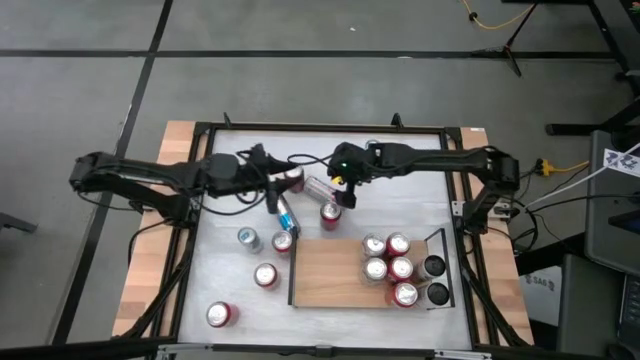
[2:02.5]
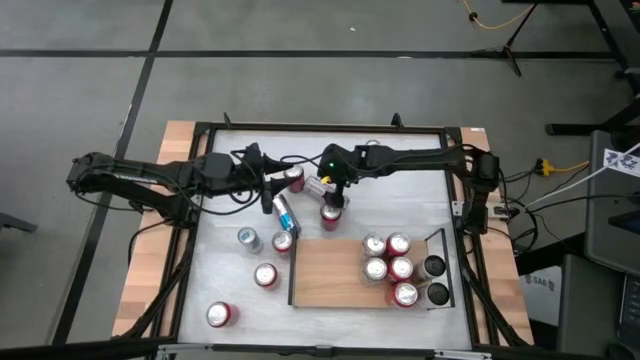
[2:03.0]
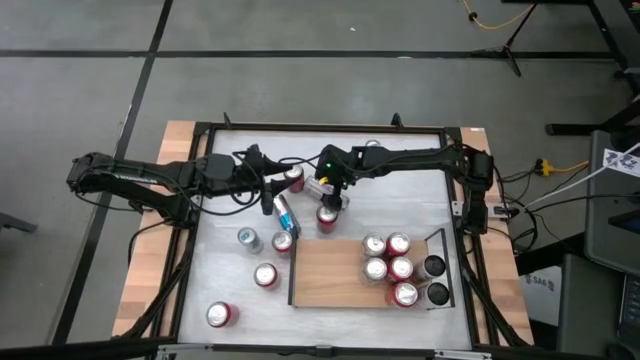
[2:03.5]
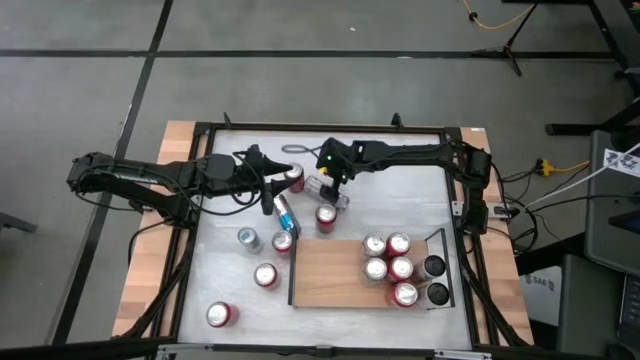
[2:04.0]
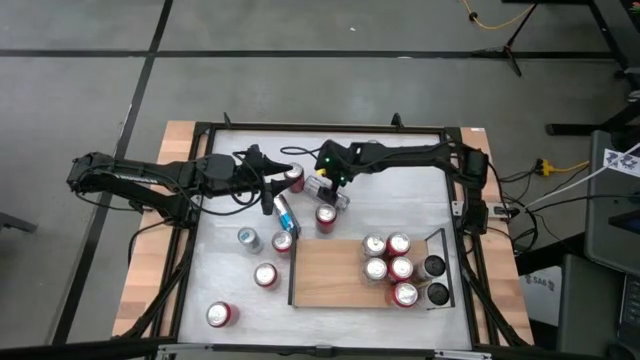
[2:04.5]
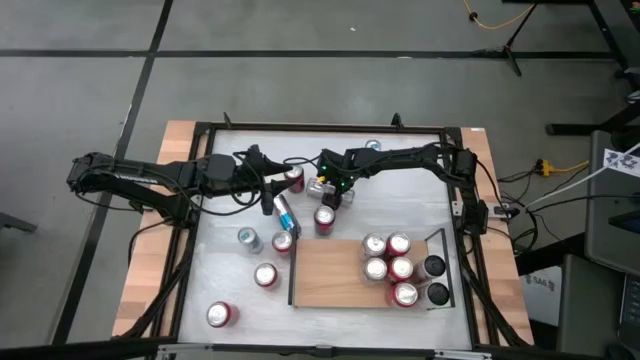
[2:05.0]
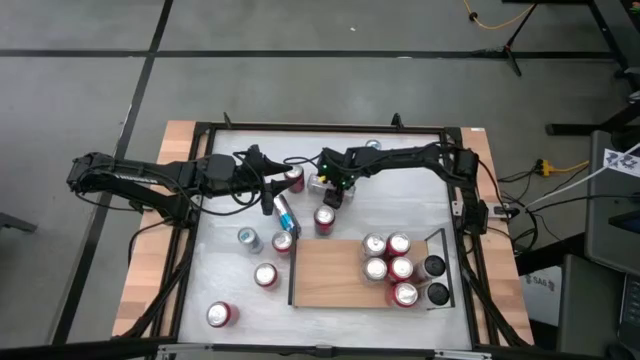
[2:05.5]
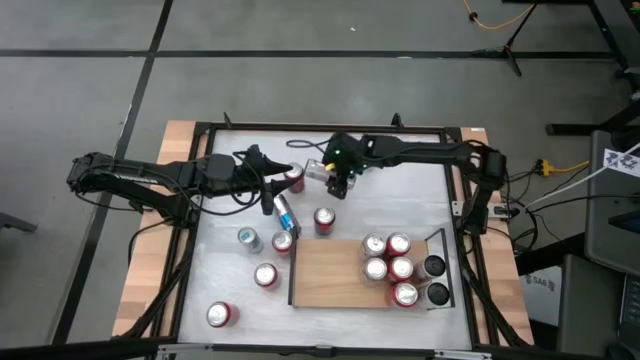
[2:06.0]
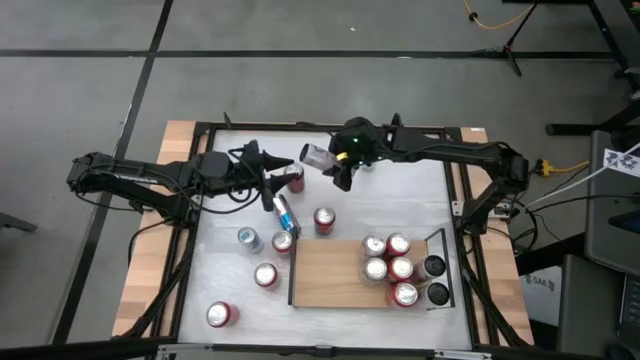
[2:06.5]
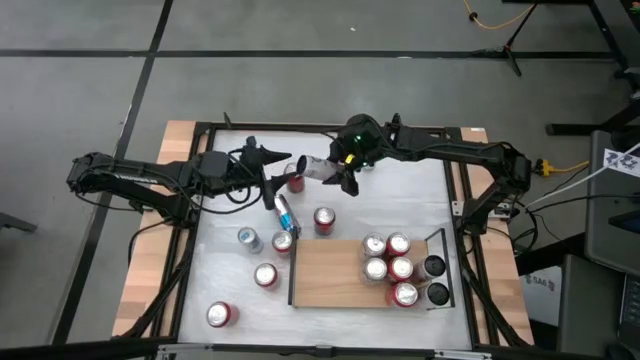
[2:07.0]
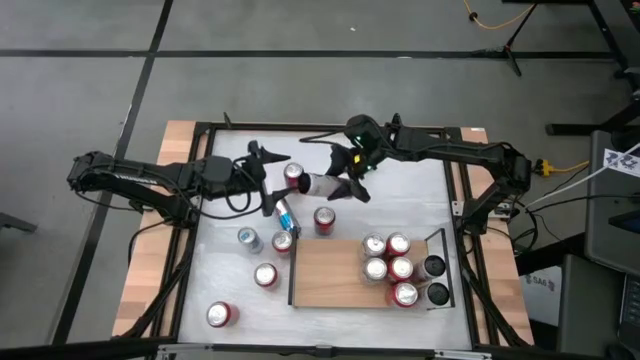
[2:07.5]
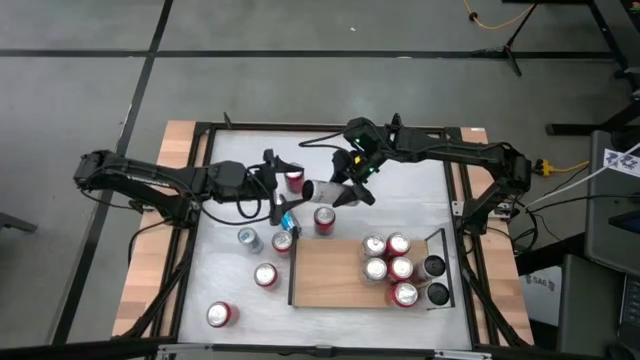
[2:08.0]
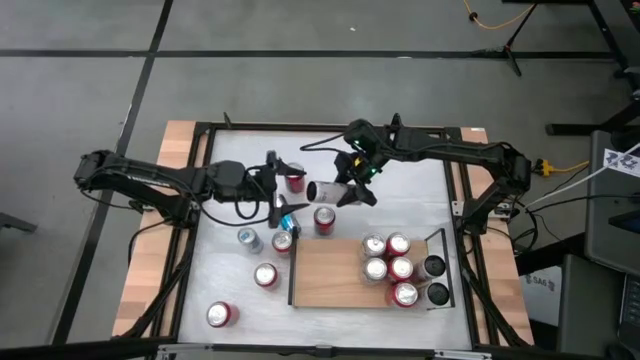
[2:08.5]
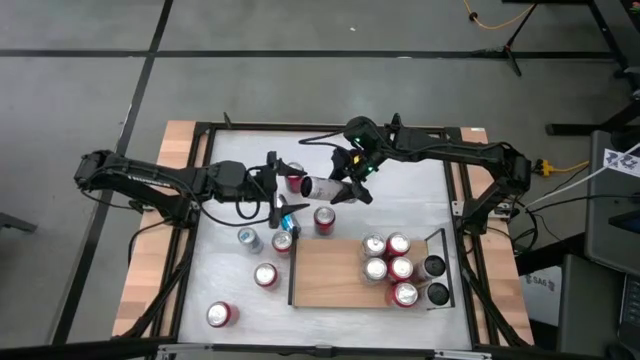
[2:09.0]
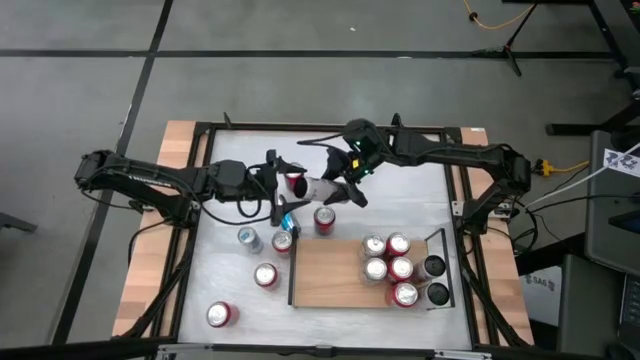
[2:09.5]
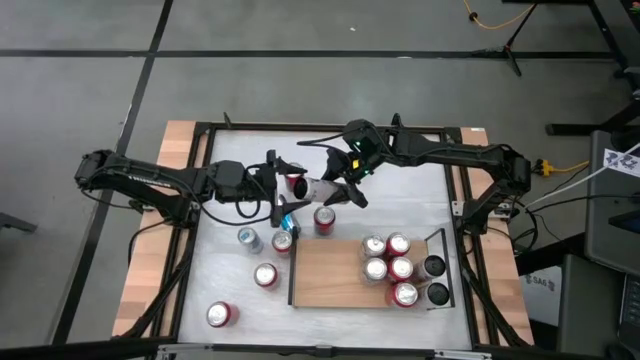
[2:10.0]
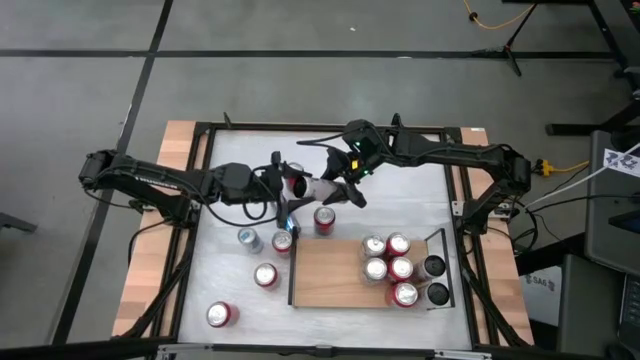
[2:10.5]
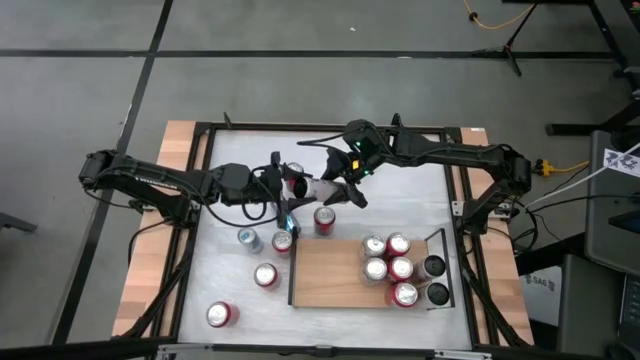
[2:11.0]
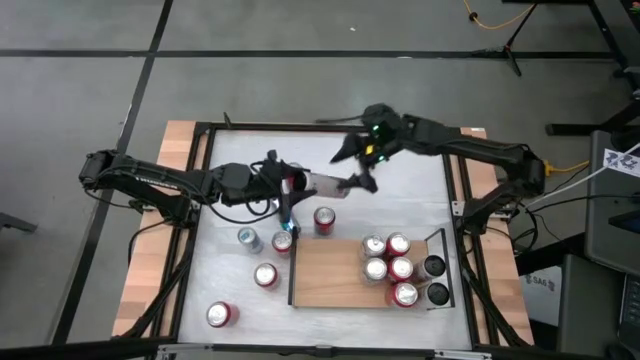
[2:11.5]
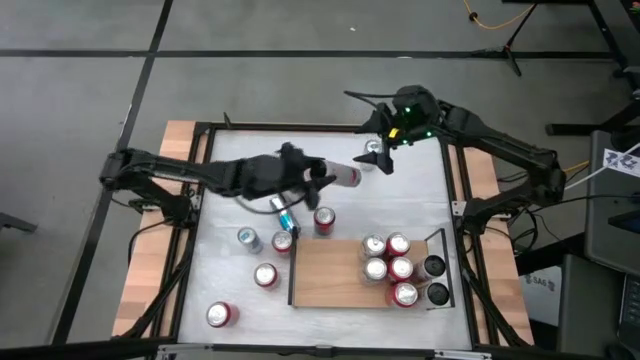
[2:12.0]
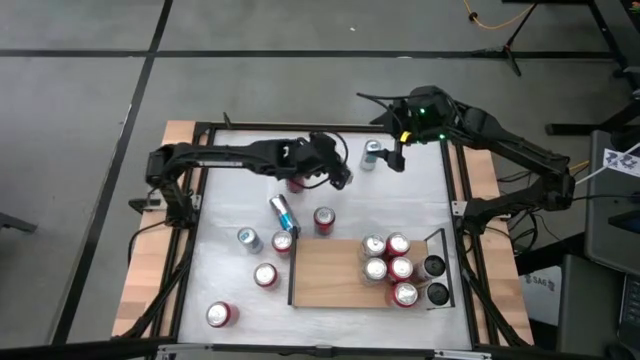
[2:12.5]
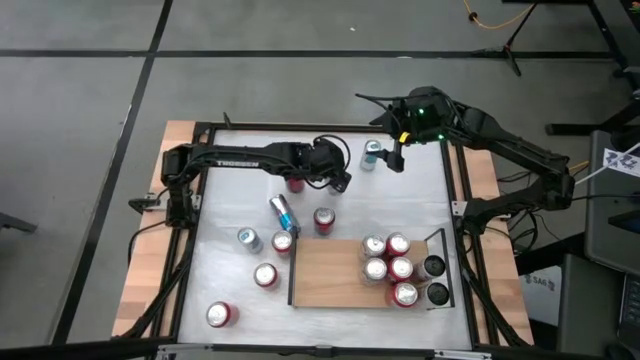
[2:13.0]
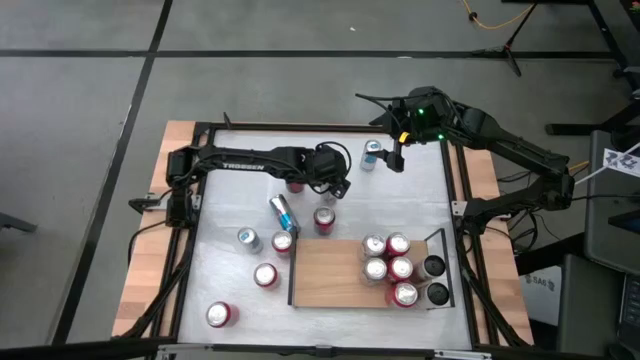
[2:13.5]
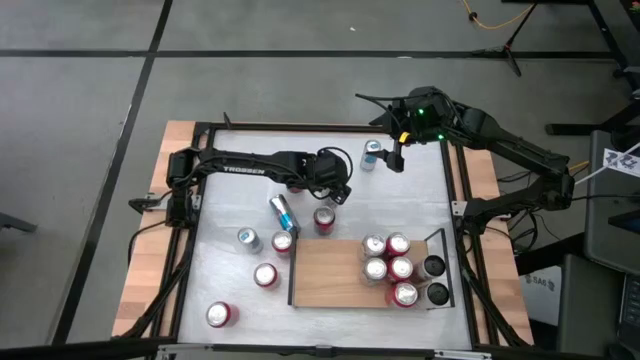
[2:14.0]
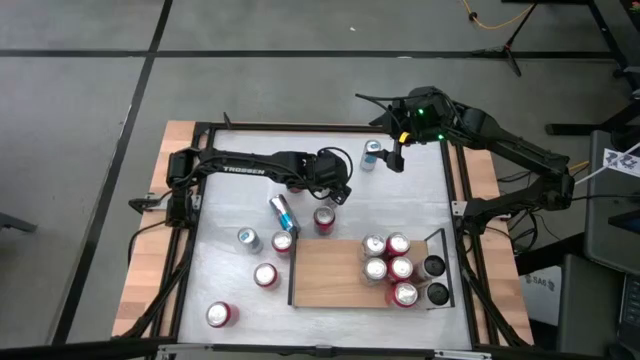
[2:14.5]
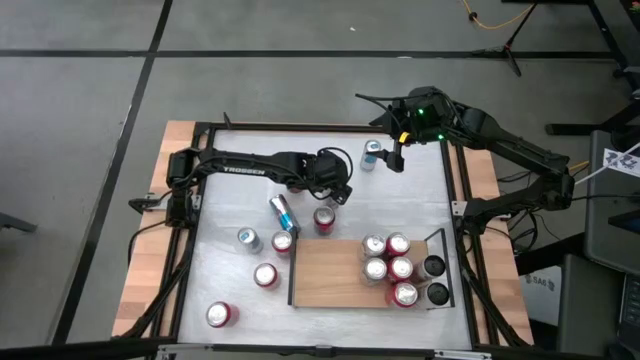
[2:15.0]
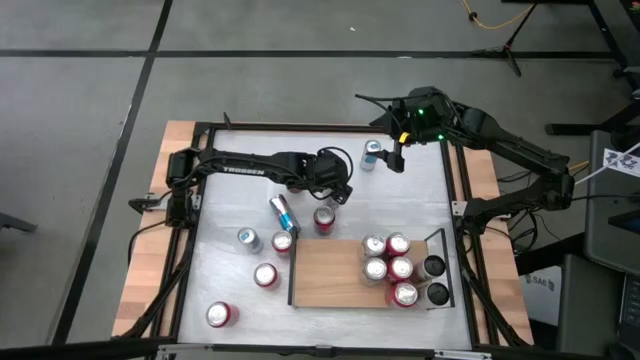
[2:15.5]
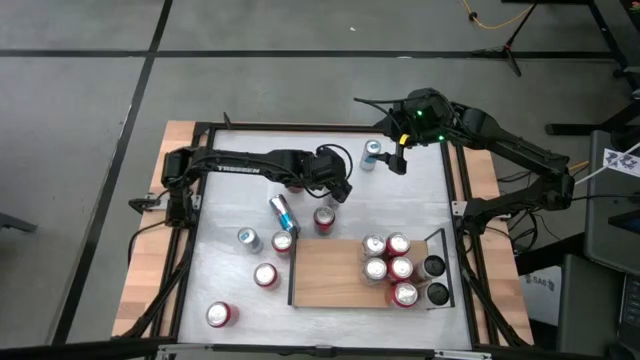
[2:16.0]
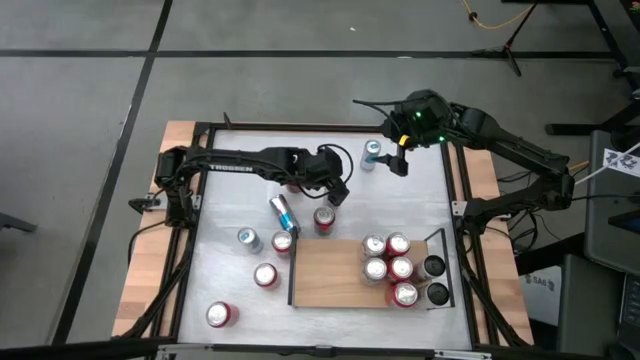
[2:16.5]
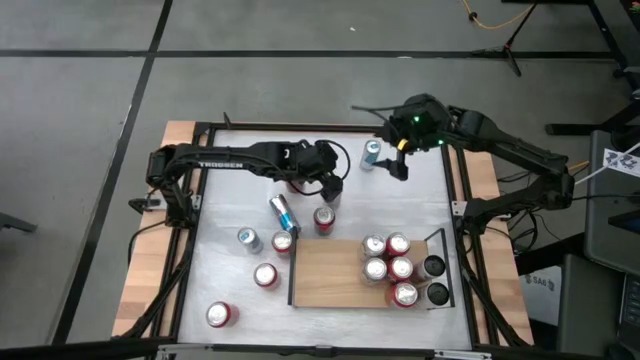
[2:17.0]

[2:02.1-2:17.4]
Task: Place canned beverage on shelf
Adjust the black soda can

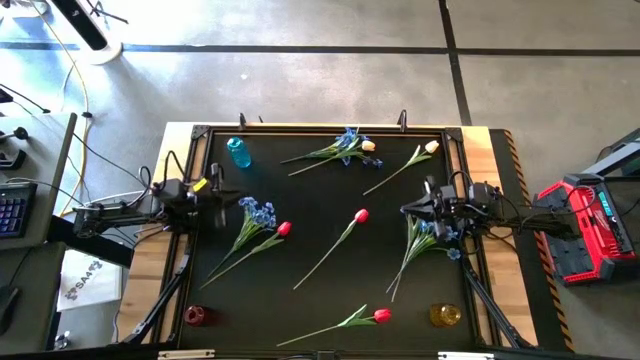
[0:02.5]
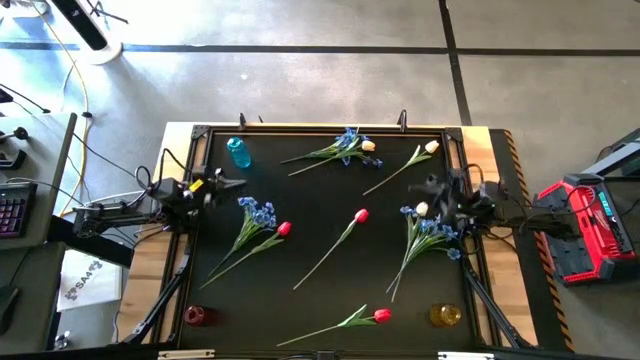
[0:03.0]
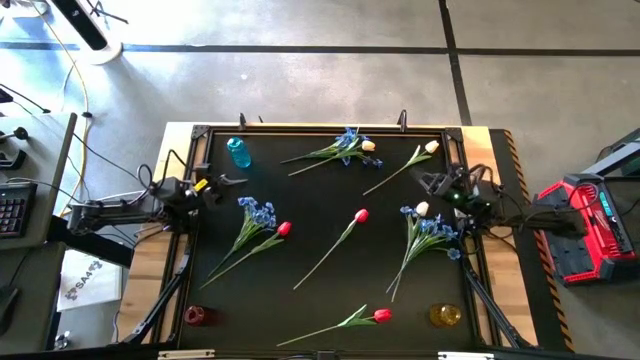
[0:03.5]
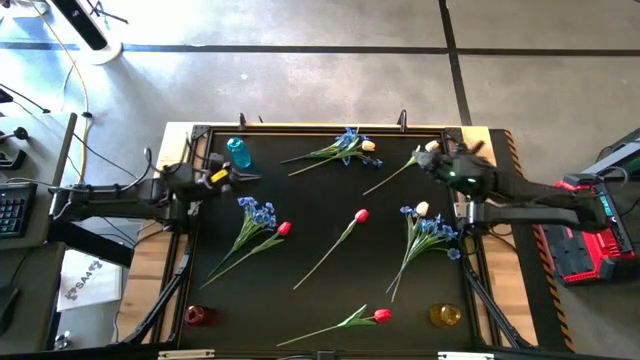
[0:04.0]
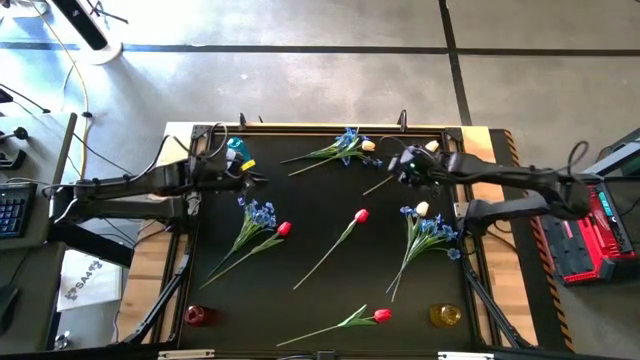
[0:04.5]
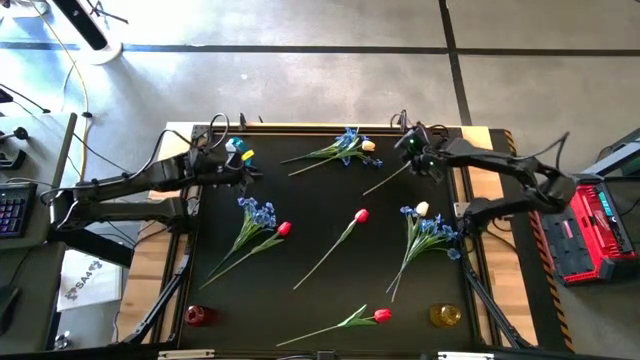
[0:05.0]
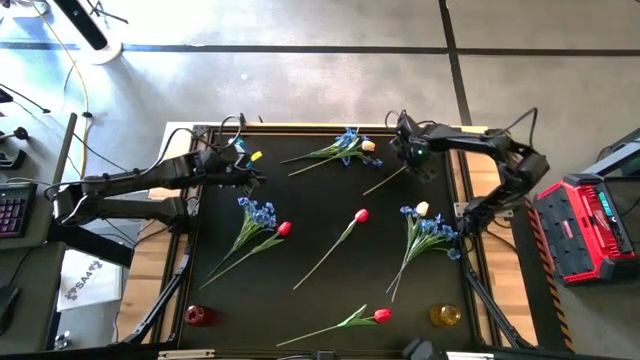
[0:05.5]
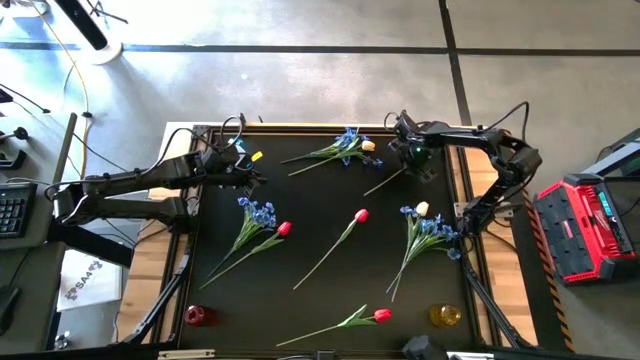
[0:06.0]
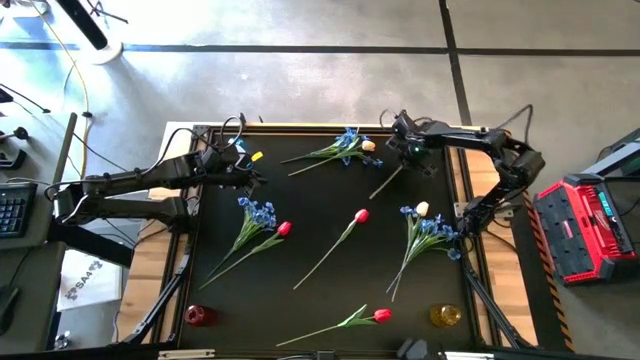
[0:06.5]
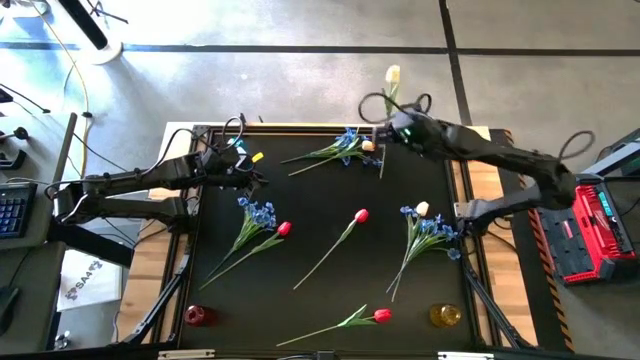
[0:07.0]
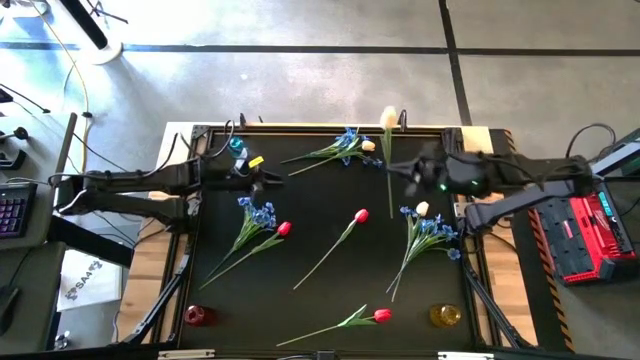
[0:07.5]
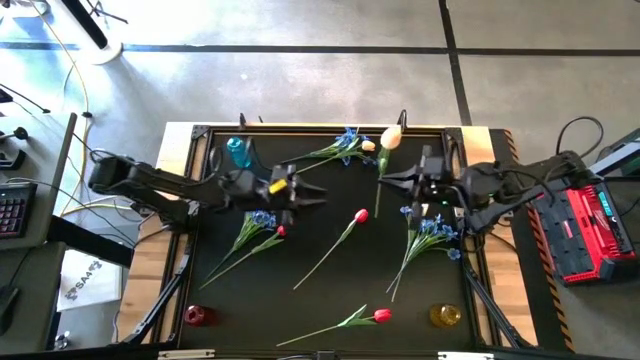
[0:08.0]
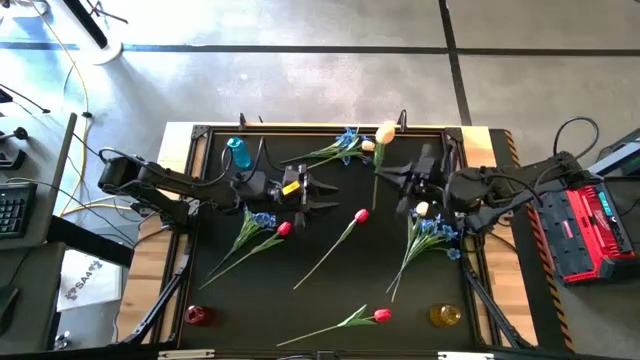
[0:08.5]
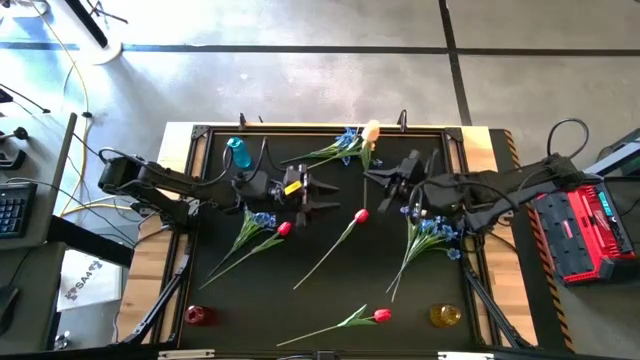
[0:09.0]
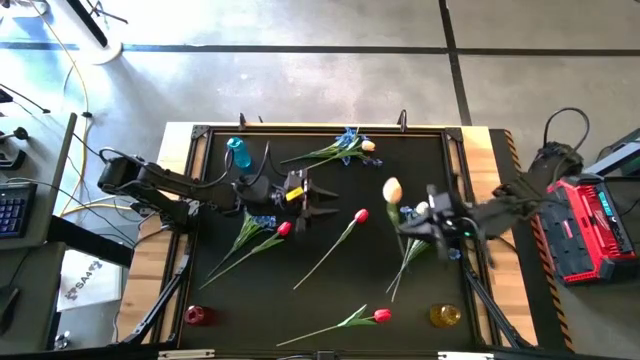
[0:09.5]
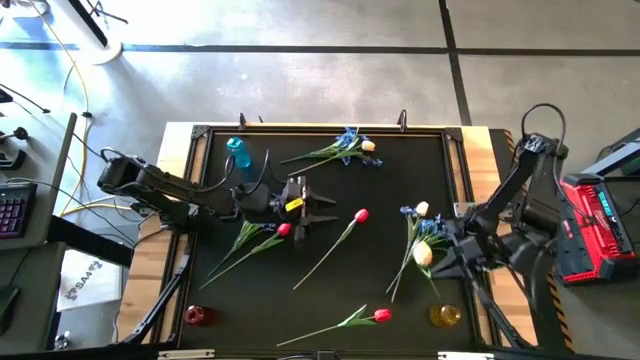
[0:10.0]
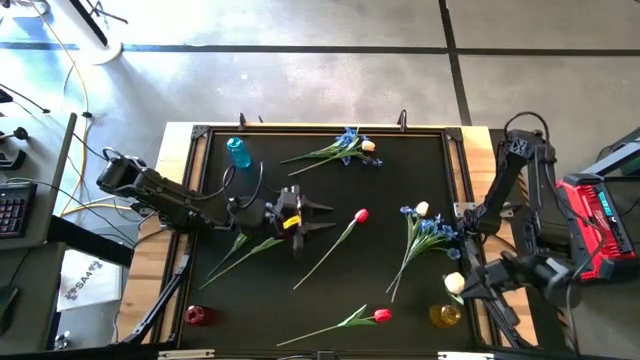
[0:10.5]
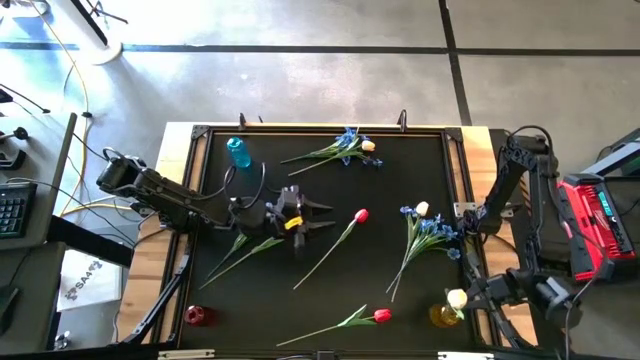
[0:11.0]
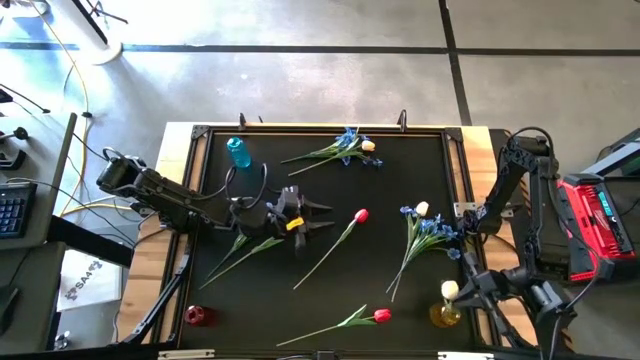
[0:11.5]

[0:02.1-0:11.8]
Task: Sort flowers into vase by color
Put the top right light yellow tulip into the yellow vase
